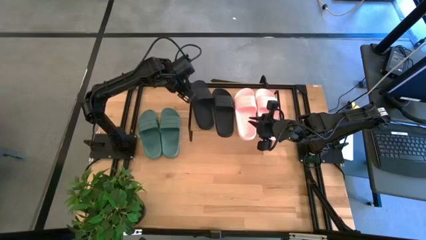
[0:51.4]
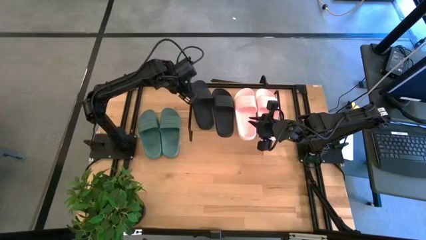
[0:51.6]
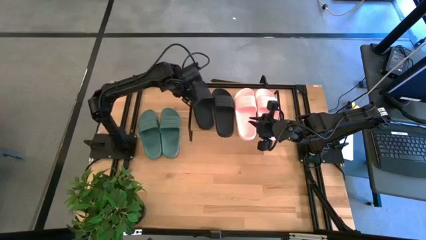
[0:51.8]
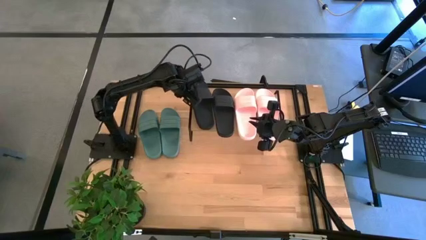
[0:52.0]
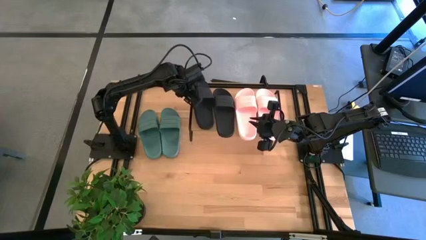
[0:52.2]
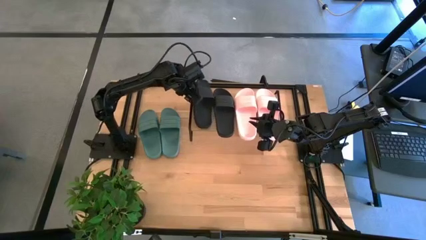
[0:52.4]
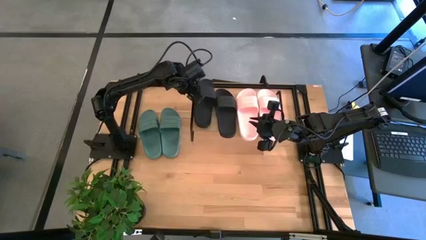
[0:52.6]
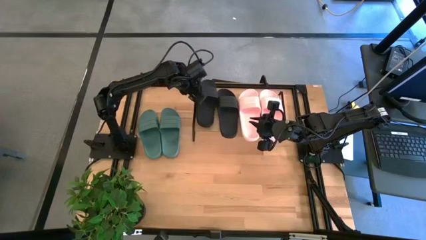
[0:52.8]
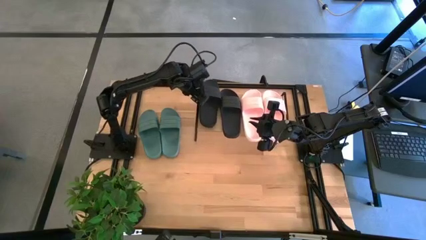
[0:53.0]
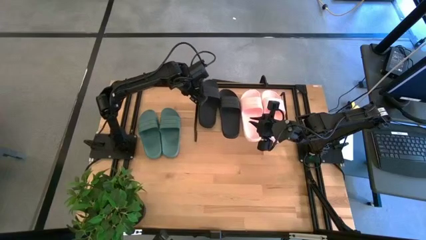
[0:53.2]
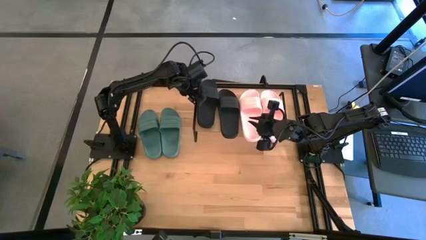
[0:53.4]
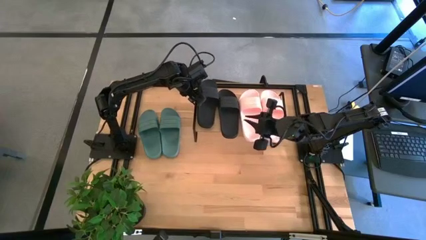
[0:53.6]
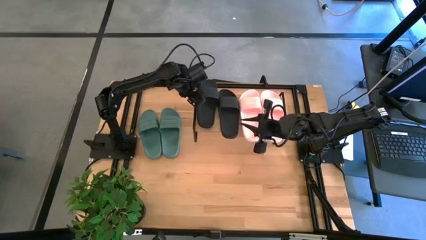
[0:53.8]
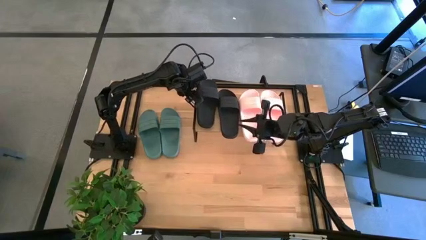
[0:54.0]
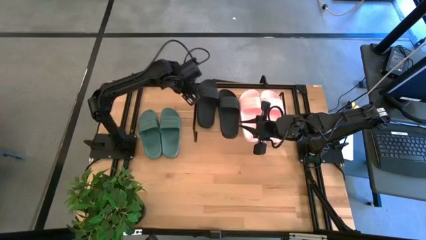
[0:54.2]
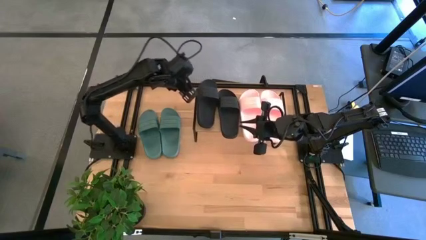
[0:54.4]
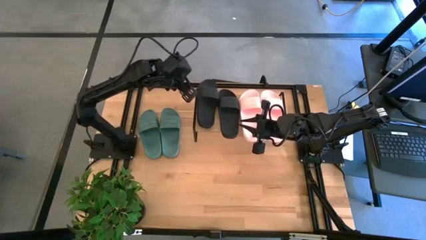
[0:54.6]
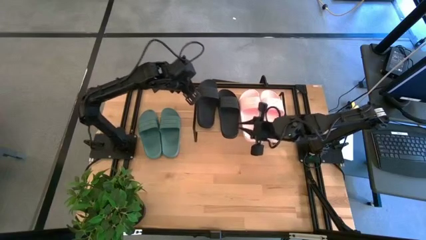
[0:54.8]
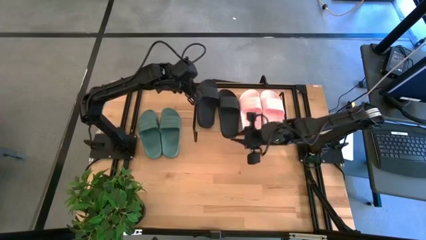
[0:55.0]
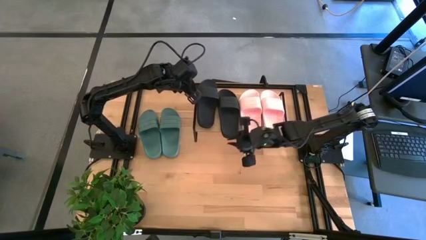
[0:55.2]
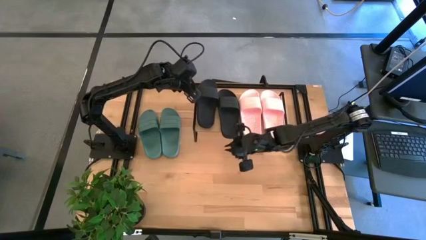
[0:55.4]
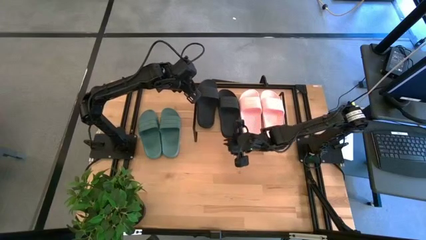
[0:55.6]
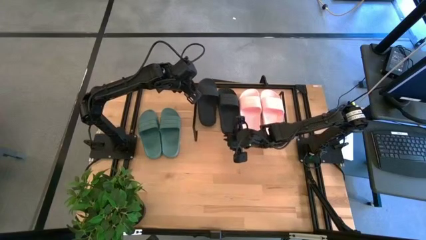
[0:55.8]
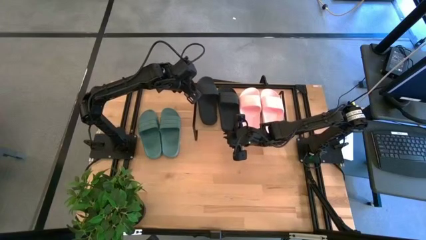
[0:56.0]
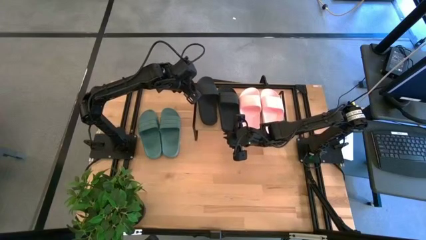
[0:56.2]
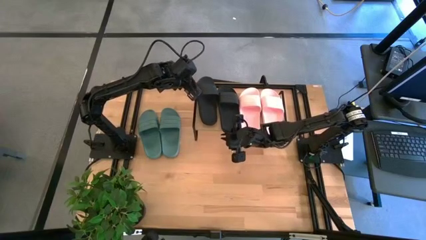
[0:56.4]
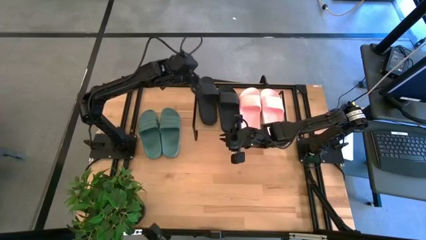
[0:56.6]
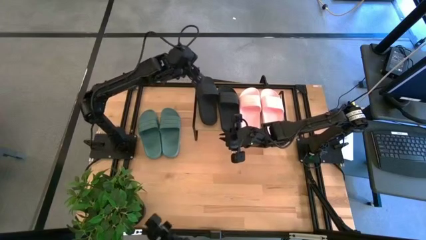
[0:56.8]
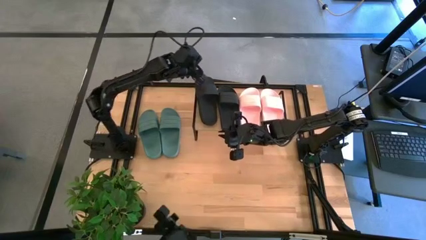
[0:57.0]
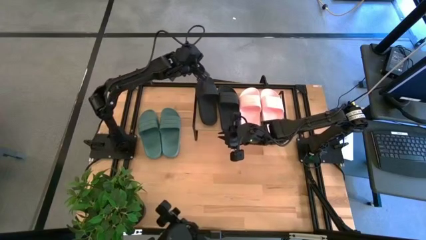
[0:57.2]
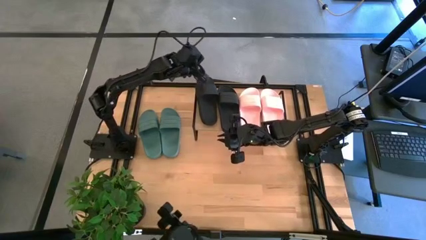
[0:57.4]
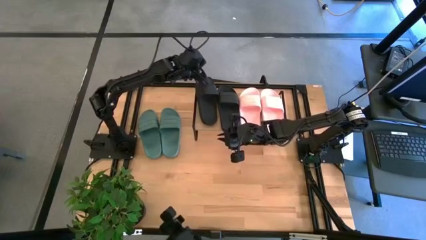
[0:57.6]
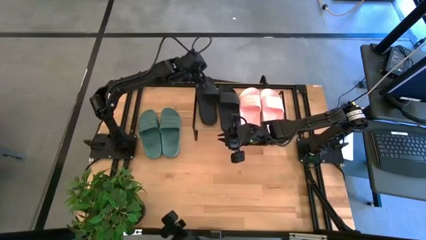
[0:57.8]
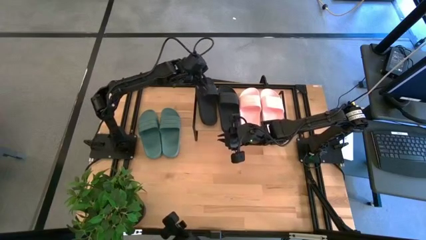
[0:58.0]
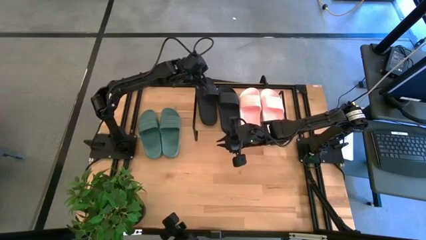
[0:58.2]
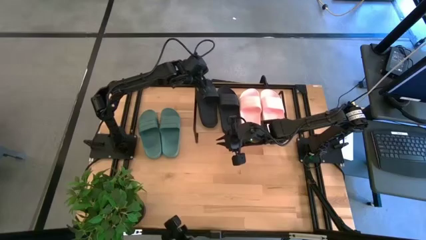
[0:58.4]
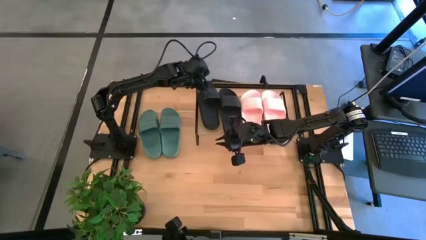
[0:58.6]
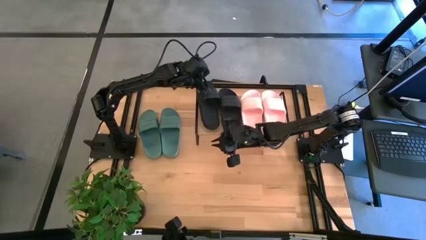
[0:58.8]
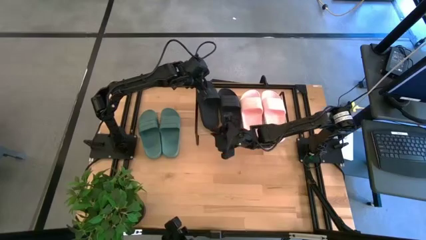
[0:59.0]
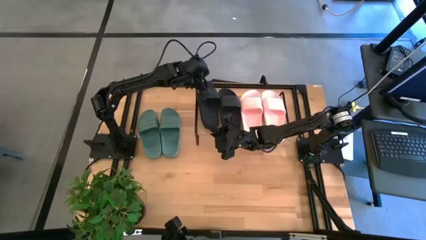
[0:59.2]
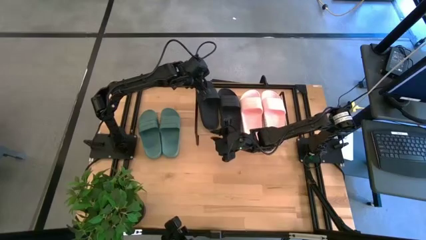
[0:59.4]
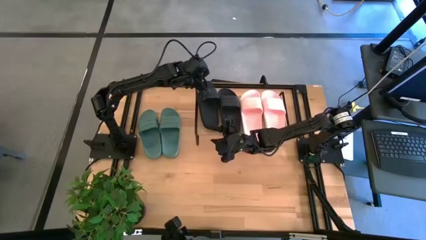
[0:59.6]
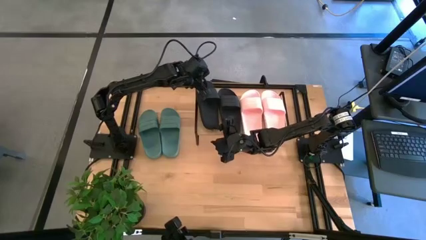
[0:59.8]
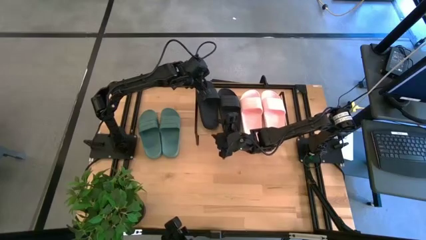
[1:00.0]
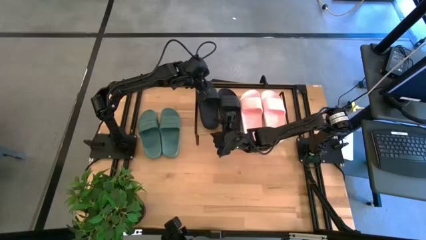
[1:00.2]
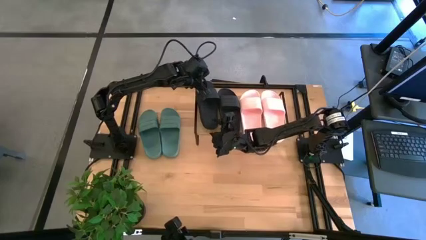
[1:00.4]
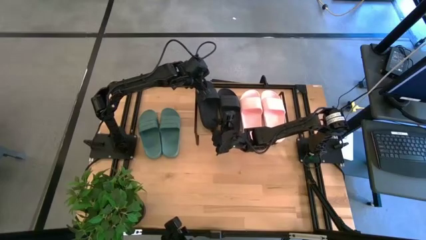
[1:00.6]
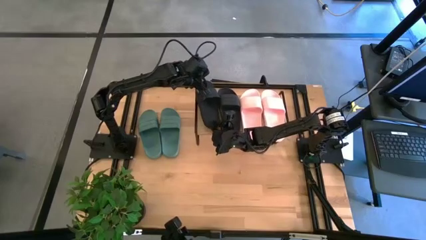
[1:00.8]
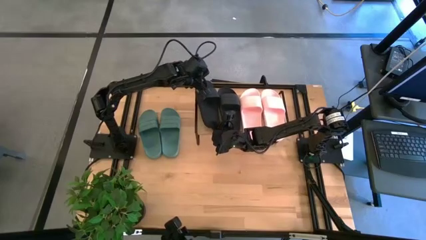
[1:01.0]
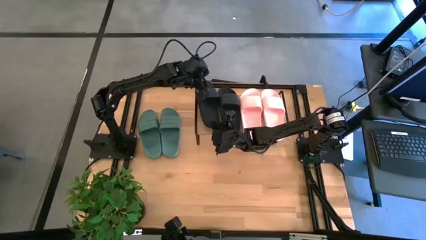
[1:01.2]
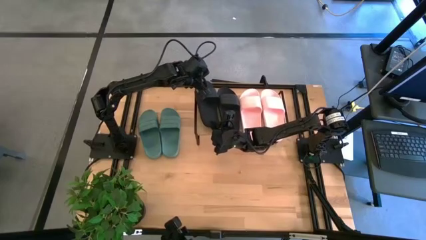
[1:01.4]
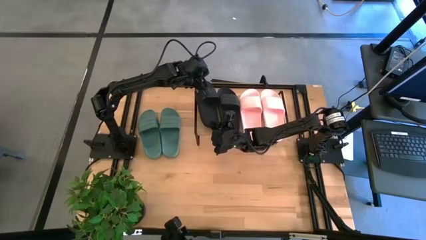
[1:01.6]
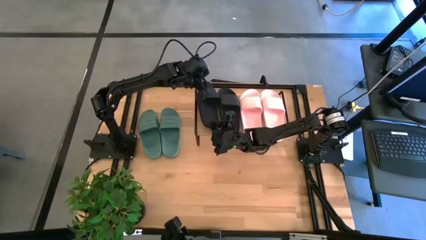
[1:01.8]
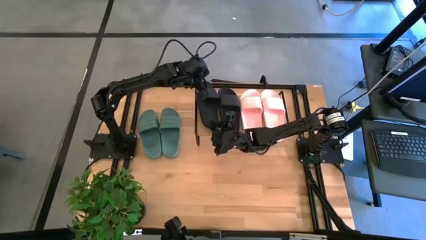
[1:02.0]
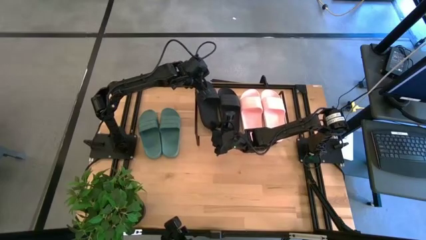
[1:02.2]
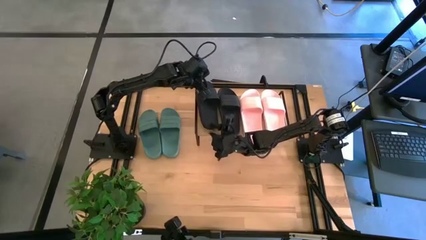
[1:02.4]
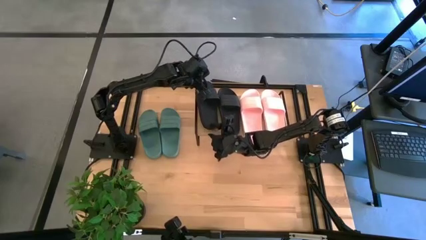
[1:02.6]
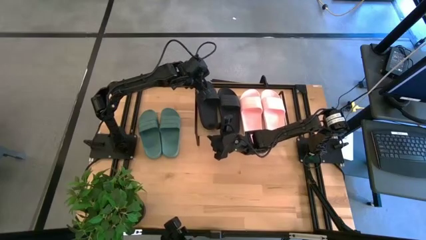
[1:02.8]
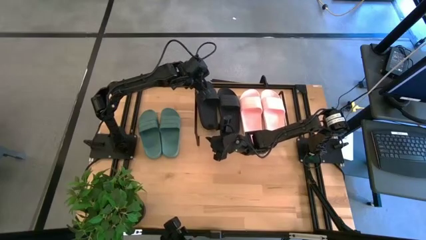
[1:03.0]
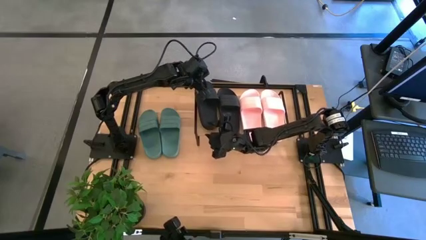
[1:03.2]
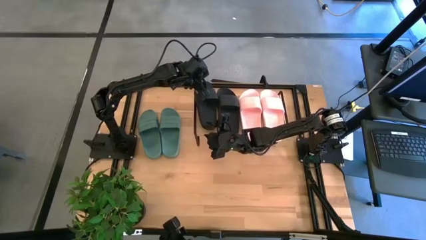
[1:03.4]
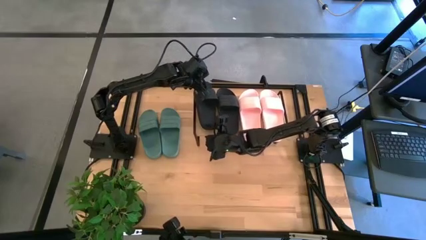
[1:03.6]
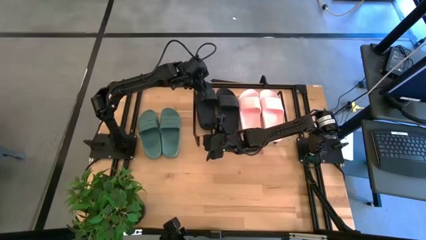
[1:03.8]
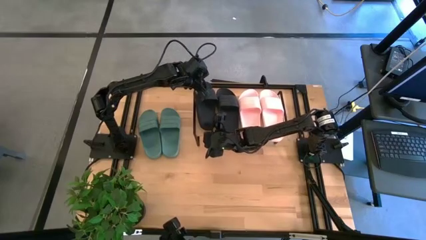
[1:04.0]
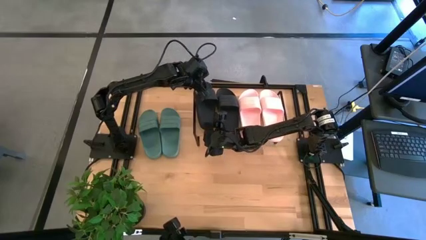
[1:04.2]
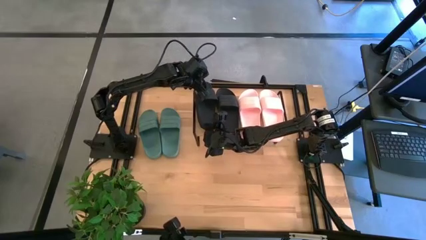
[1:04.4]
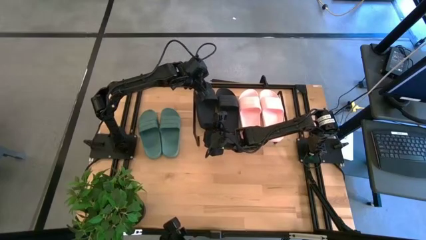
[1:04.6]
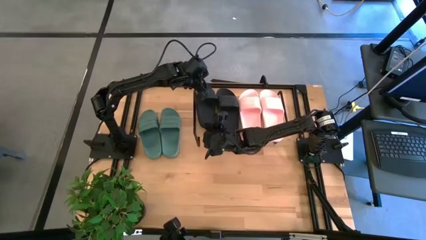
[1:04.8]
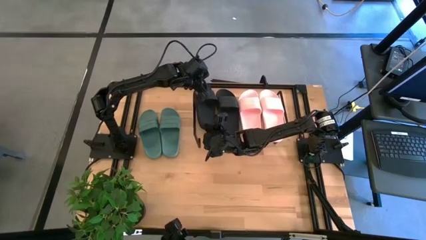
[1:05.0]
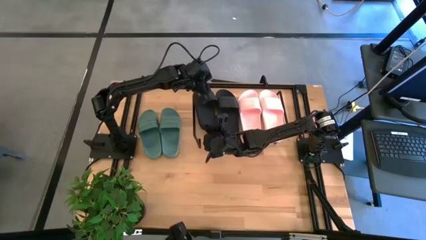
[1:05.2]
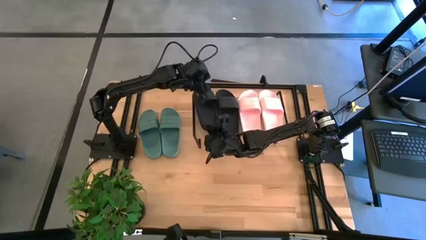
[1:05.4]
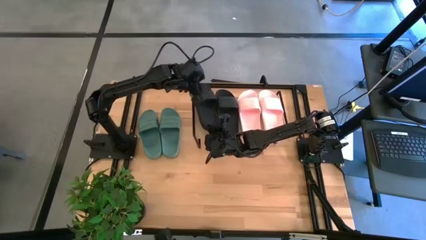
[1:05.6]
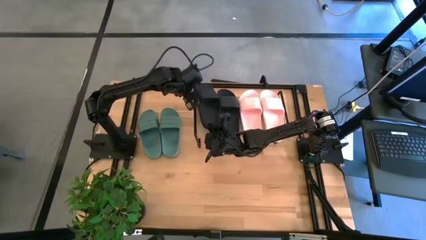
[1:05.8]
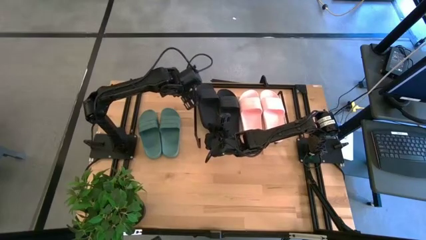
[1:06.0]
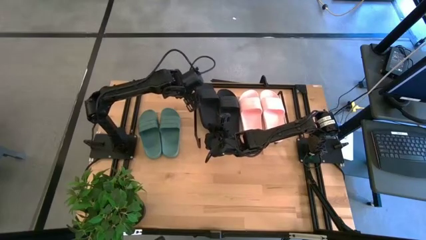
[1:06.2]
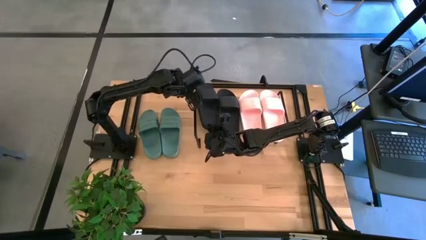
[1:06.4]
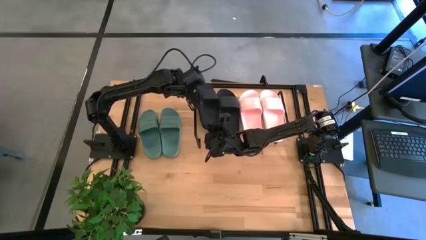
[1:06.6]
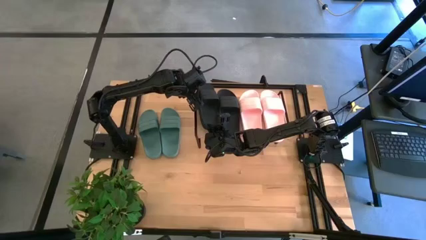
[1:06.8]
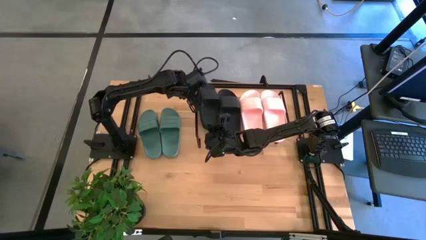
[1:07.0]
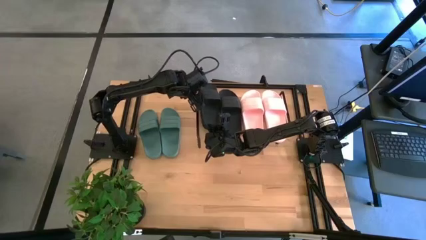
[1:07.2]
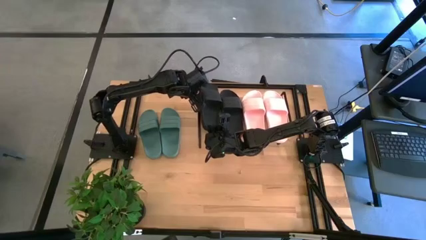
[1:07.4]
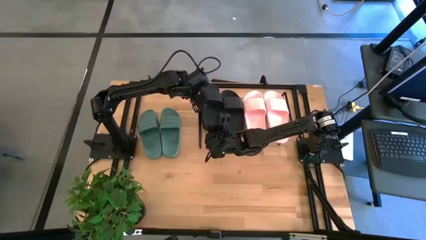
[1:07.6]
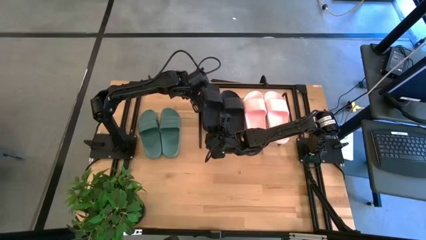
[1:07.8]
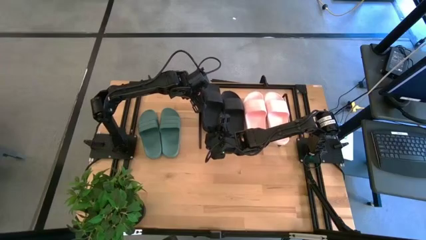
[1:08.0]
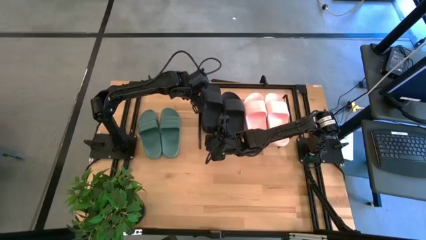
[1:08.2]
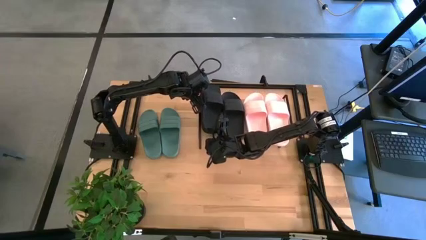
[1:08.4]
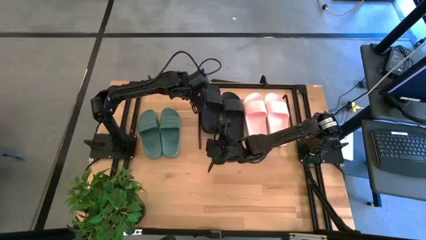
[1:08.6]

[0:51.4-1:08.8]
Task: Pick and place slides into the shelf
Put the black slide on the shelf
